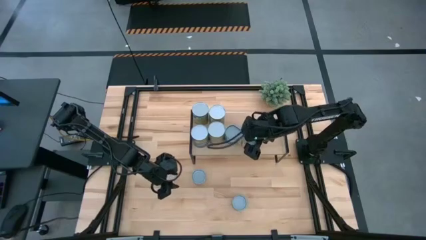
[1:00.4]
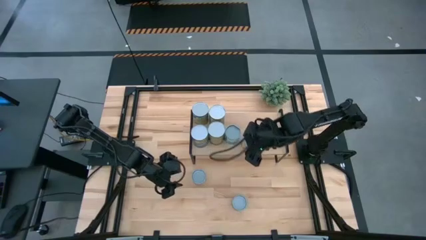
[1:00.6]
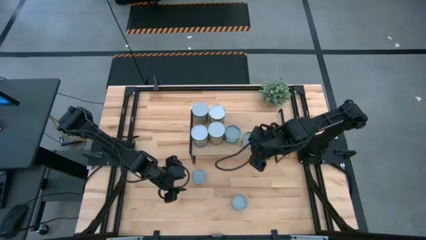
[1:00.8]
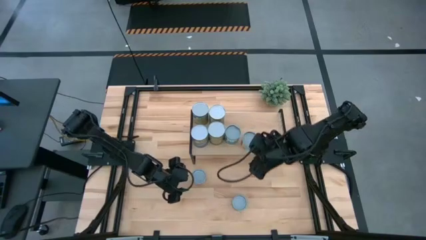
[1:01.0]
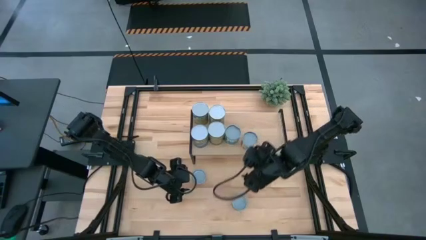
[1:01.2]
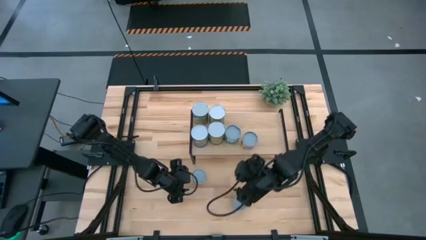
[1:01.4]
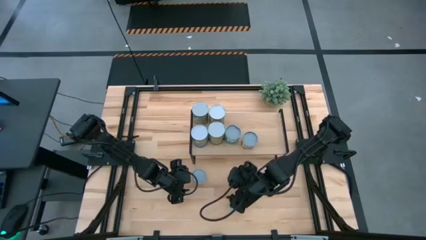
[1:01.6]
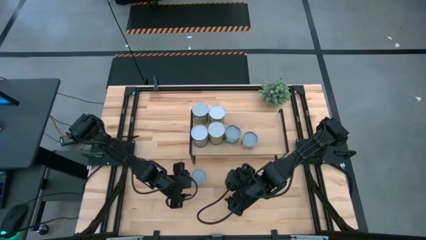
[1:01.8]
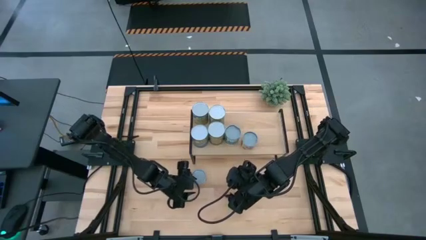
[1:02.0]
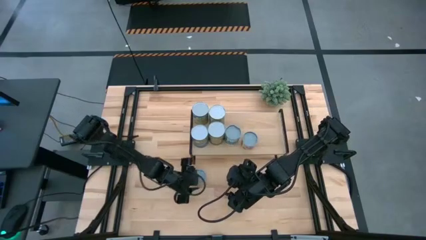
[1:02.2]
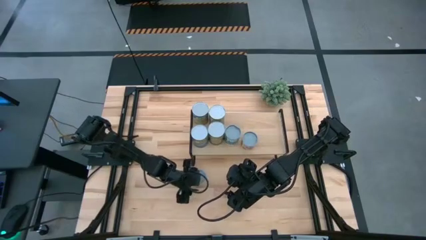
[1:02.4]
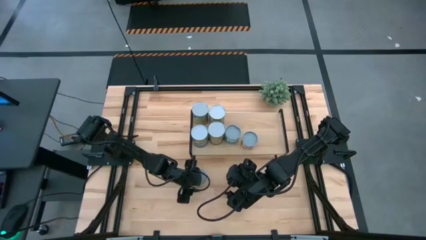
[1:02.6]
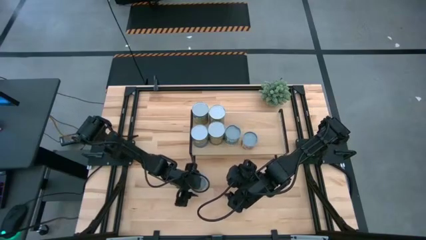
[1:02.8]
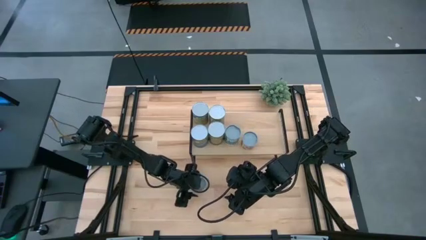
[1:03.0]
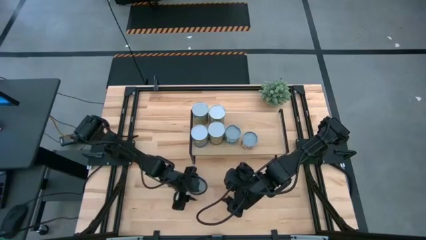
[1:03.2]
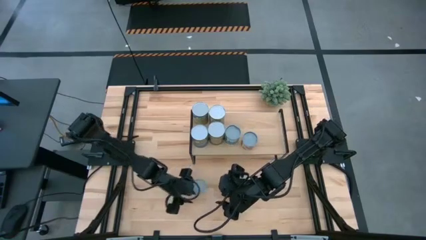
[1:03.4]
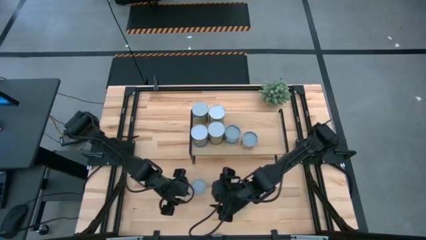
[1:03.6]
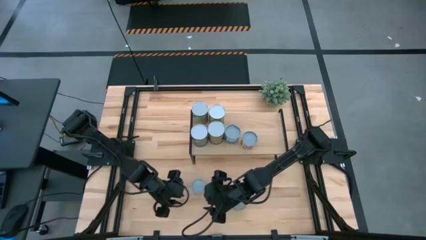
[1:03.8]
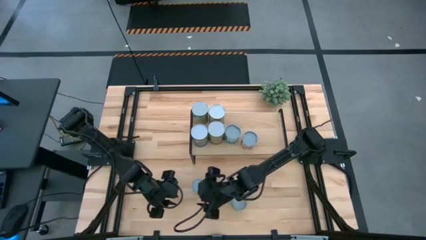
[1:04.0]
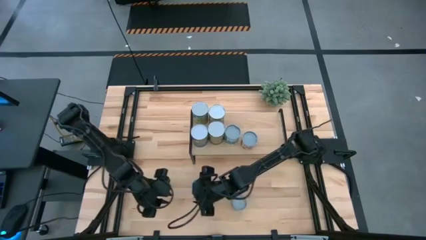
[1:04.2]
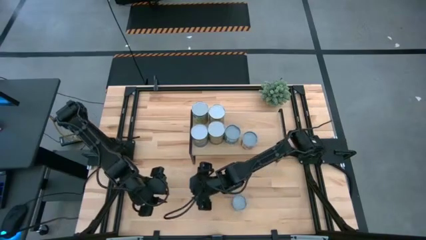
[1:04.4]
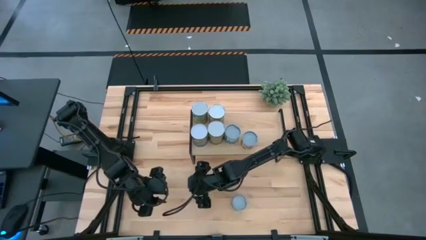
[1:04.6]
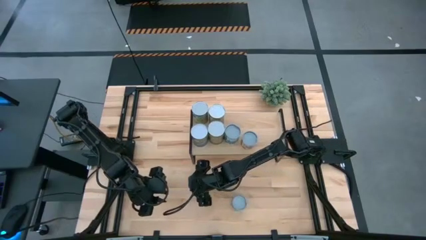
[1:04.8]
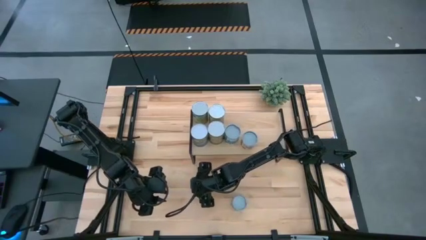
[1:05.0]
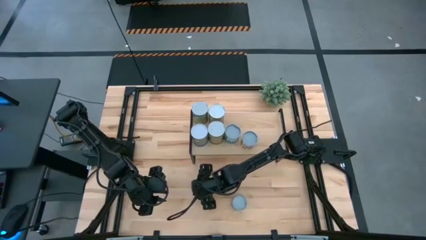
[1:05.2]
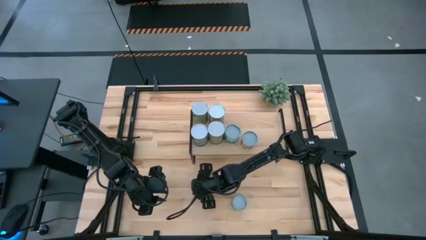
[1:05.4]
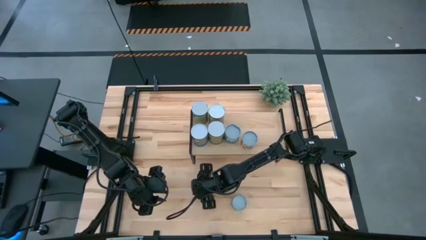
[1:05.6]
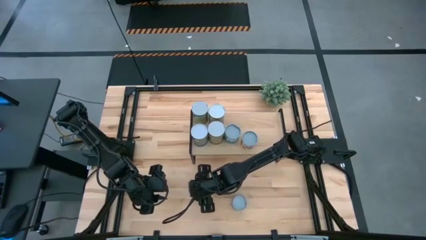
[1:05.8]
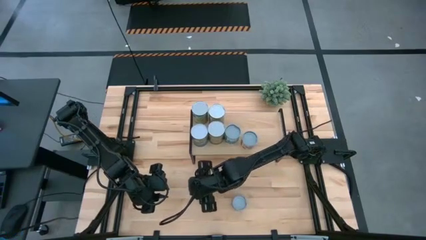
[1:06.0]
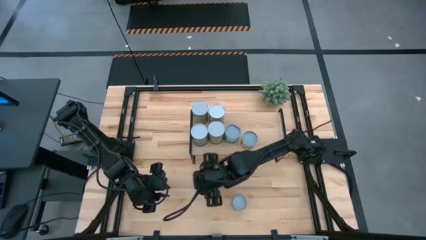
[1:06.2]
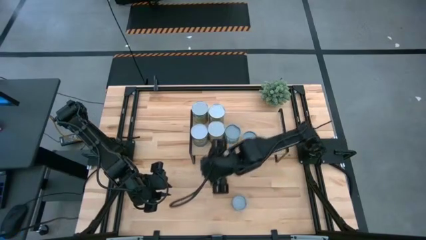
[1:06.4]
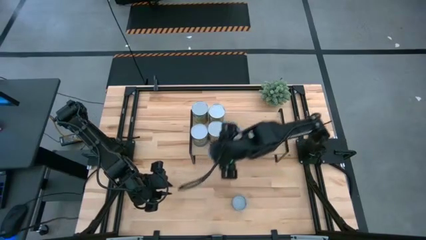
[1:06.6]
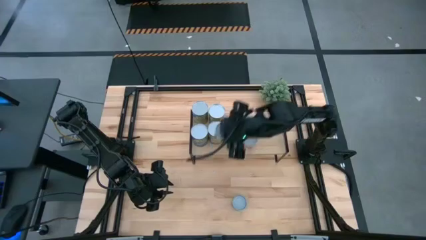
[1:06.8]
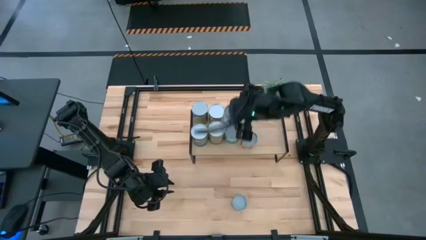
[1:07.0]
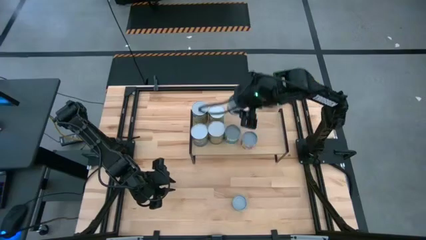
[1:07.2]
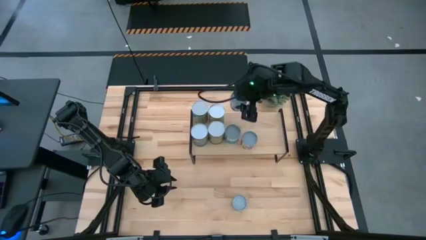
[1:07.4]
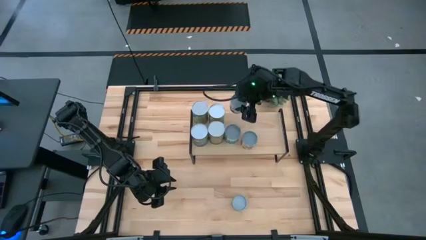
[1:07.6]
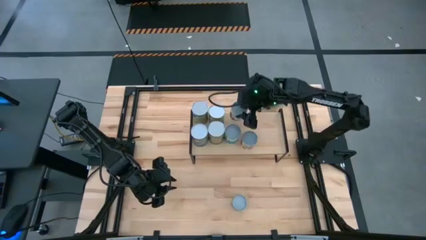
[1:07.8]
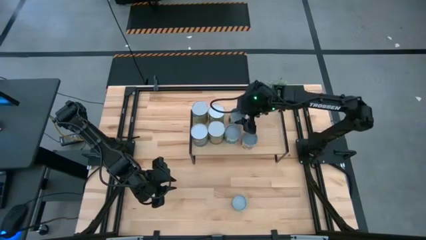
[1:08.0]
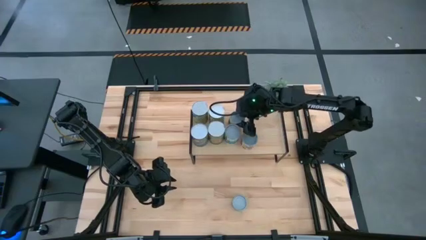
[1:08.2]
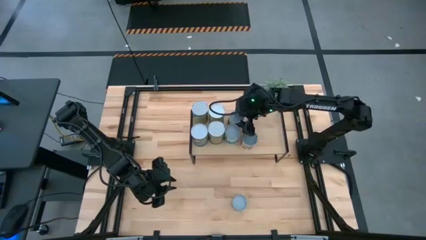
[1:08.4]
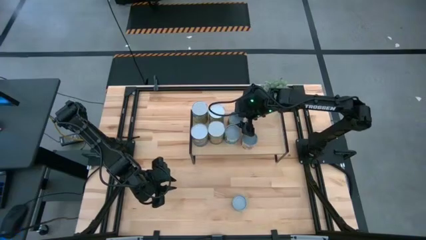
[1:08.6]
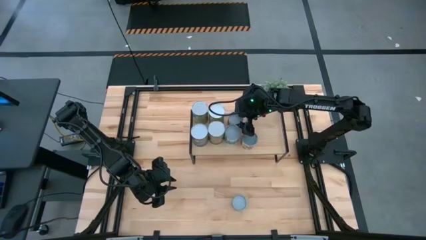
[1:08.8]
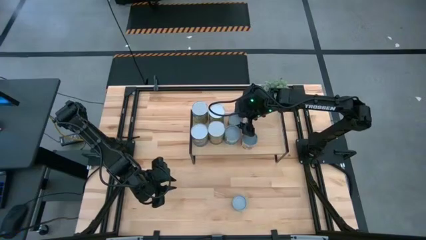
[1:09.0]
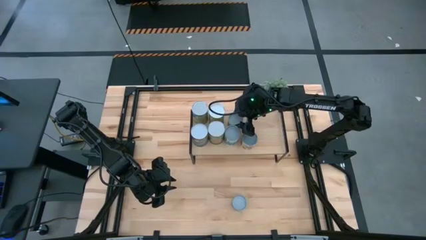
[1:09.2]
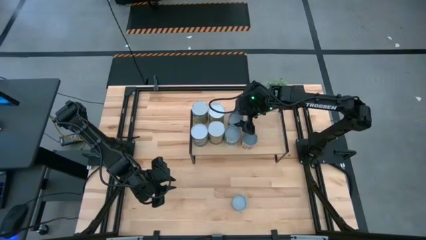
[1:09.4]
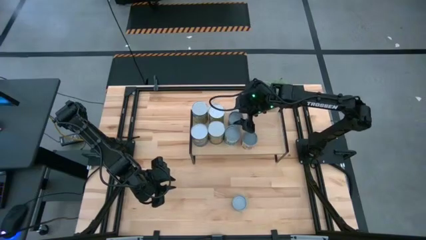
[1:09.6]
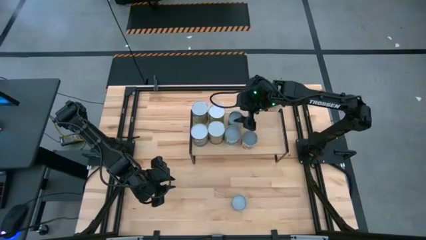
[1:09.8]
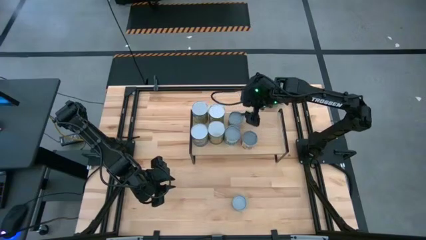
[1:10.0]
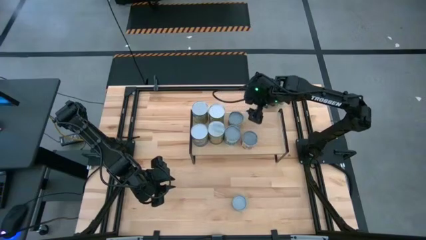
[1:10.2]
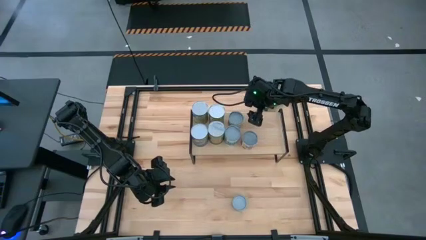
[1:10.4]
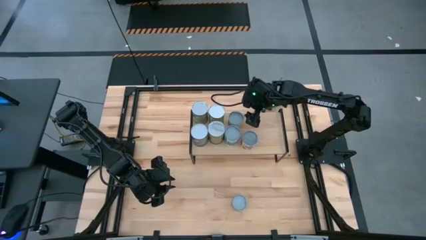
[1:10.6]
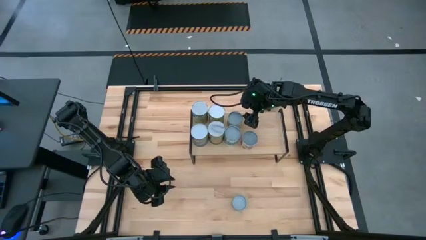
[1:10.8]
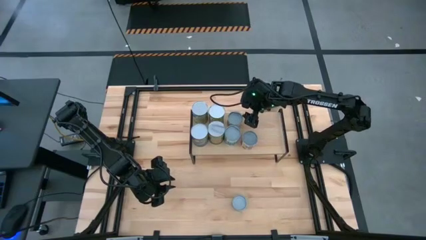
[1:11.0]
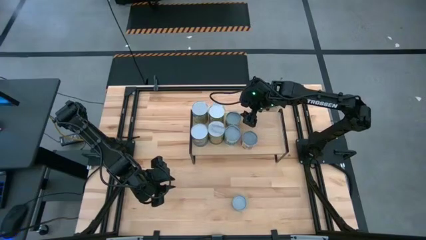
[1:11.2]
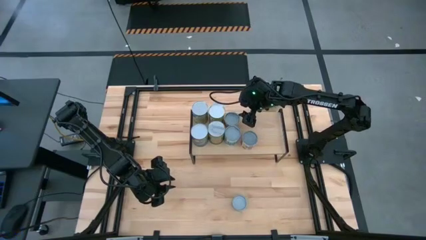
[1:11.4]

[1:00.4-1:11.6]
Task: Pick and place cans onto a shelf
Put the canned green peas on the shelf

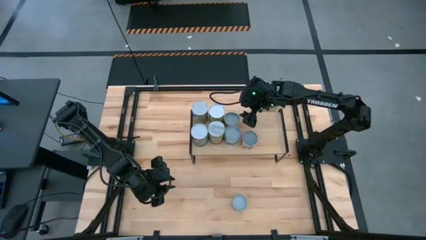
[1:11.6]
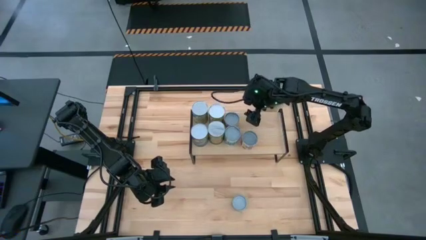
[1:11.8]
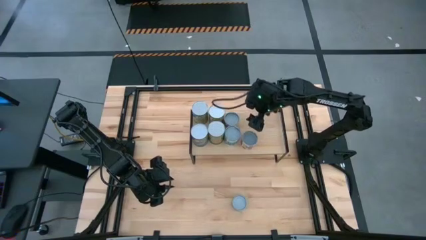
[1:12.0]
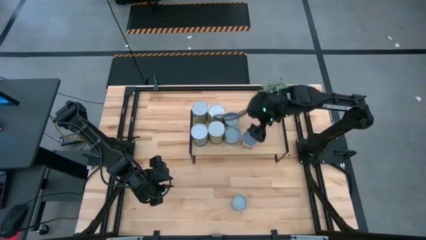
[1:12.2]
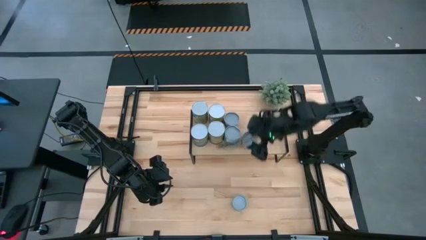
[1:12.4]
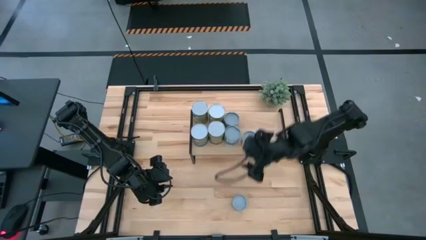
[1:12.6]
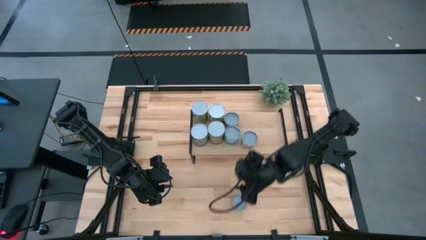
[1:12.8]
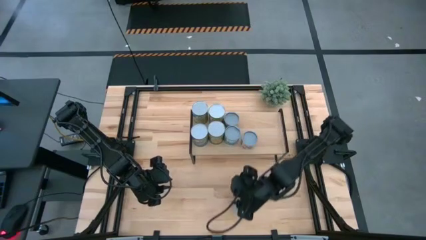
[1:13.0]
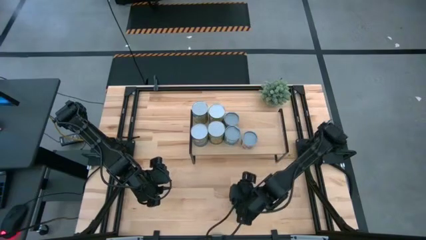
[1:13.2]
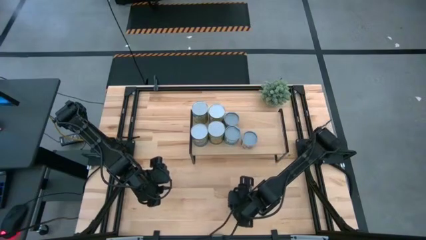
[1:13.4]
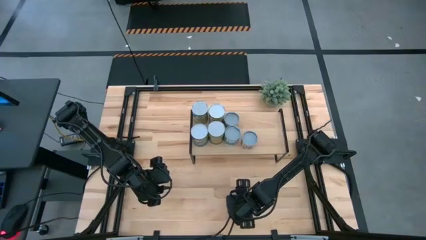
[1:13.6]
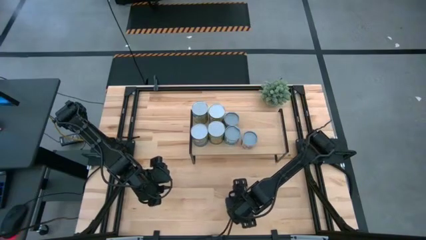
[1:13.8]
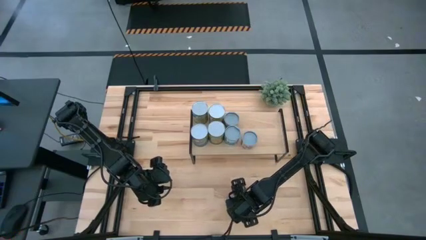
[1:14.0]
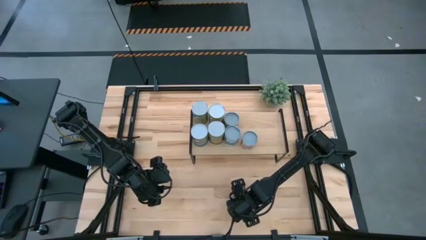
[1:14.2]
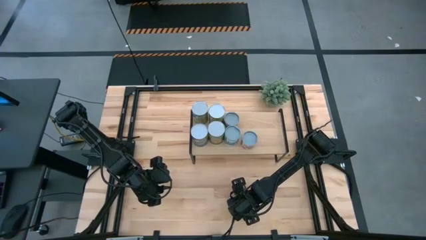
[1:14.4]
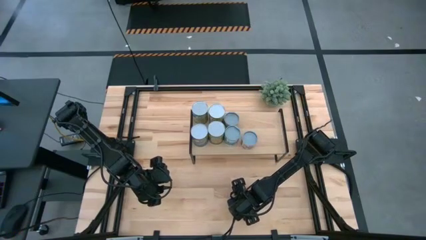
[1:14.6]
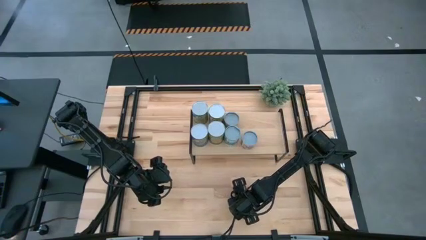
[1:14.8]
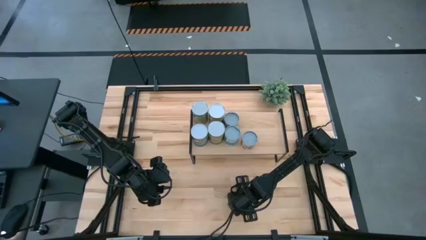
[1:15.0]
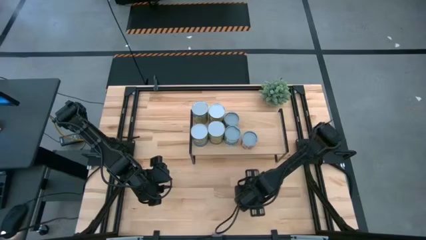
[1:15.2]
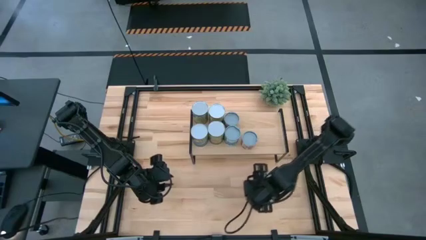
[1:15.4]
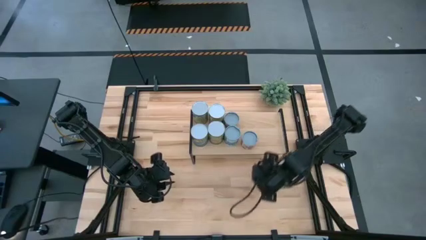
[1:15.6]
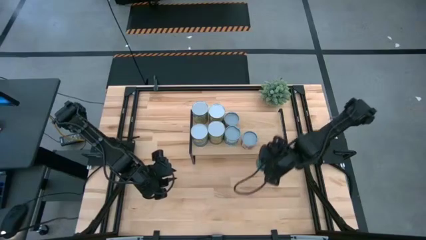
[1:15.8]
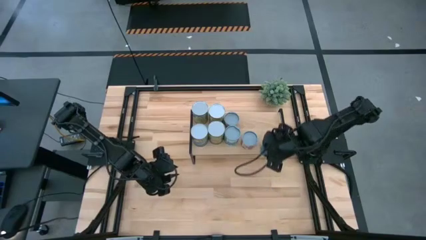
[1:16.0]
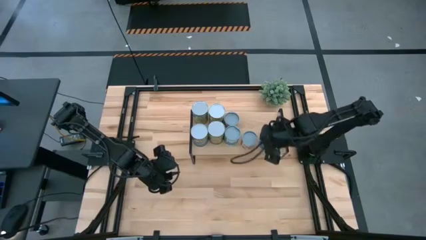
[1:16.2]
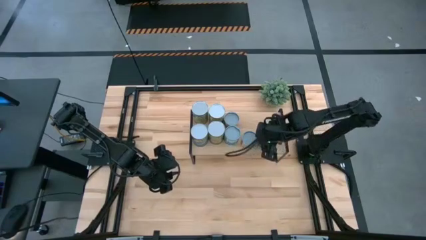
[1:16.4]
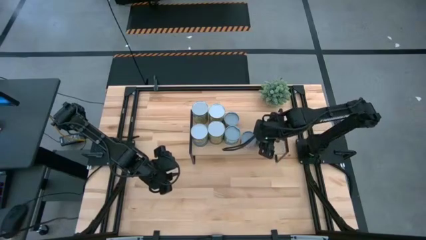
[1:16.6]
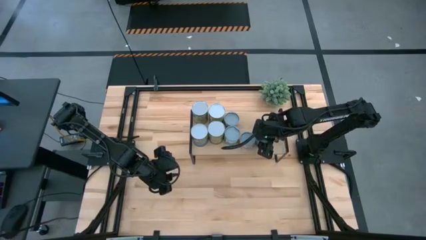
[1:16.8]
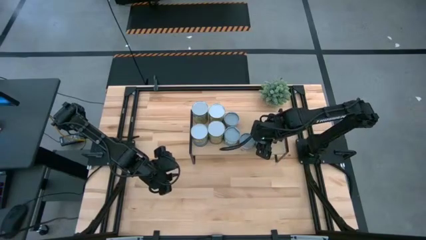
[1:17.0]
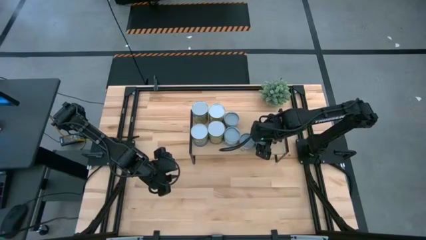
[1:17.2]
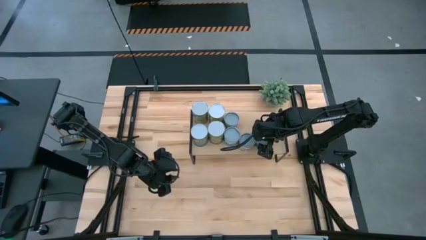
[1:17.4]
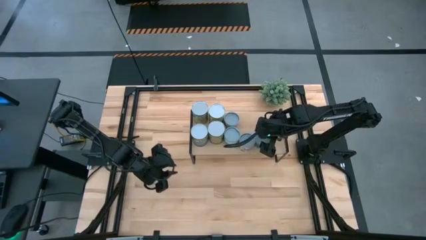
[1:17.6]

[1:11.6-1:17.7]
Put the tuna can on the shelf
